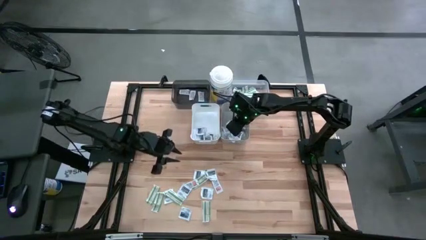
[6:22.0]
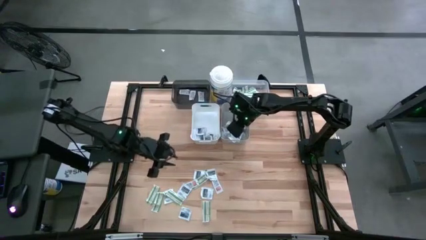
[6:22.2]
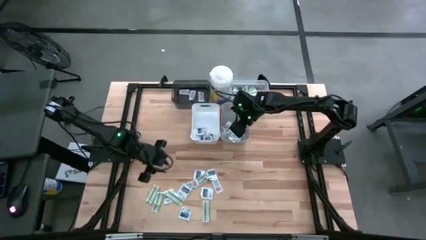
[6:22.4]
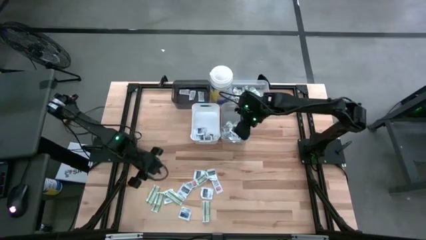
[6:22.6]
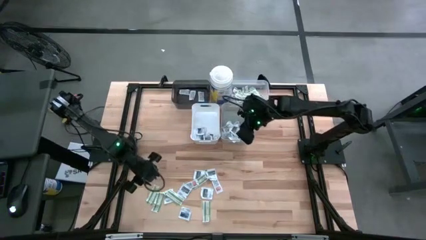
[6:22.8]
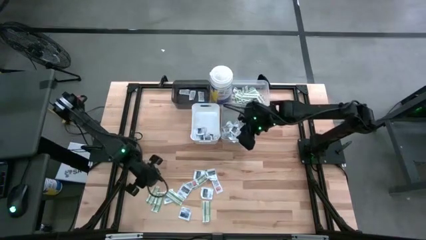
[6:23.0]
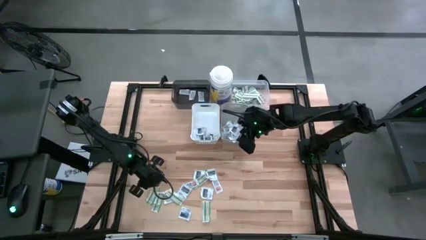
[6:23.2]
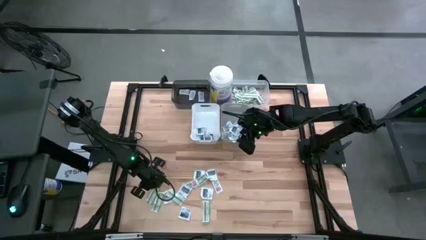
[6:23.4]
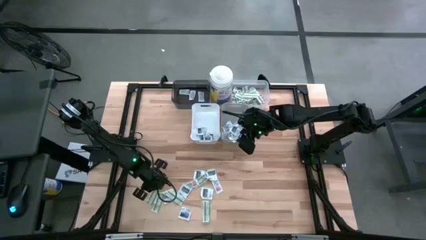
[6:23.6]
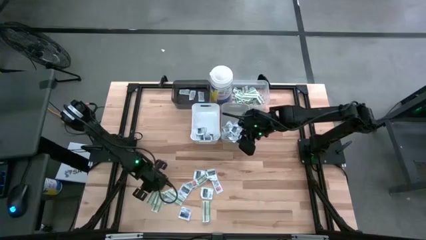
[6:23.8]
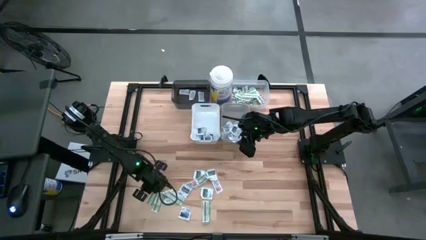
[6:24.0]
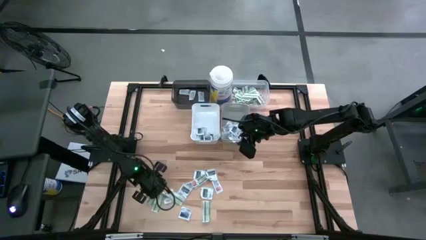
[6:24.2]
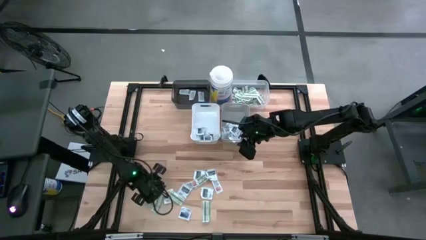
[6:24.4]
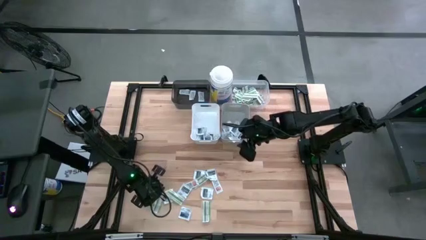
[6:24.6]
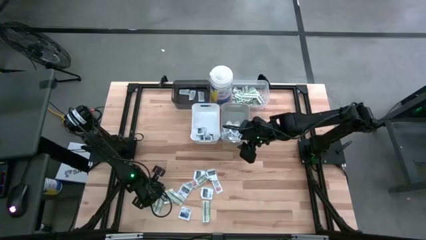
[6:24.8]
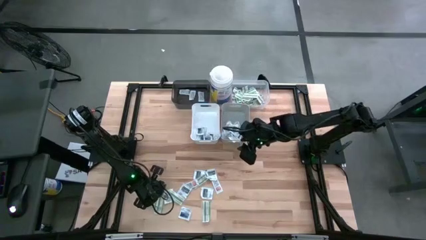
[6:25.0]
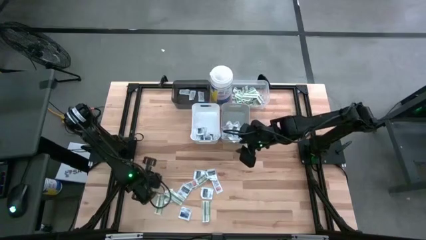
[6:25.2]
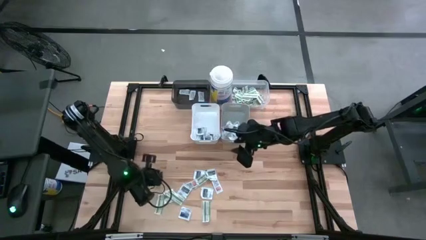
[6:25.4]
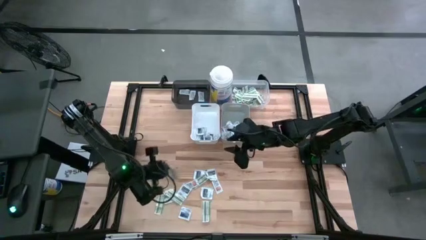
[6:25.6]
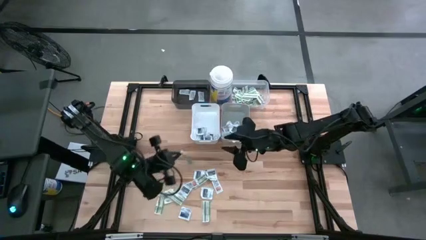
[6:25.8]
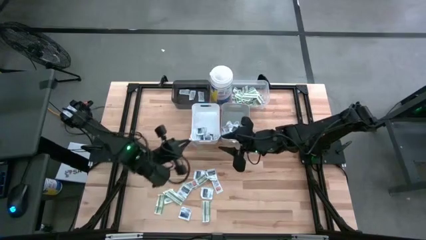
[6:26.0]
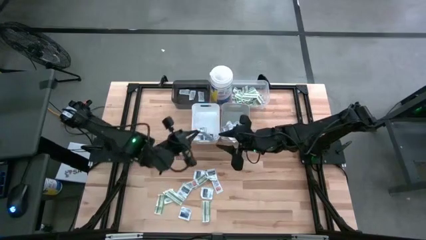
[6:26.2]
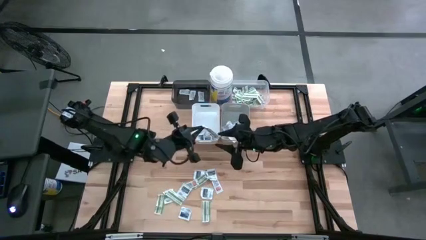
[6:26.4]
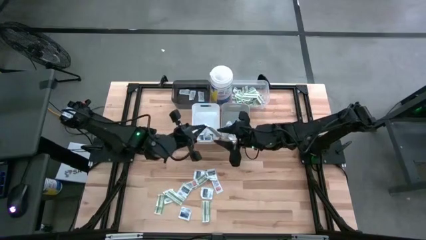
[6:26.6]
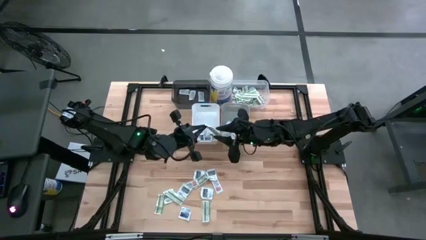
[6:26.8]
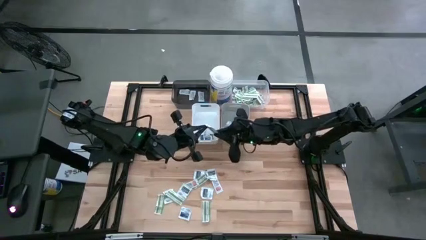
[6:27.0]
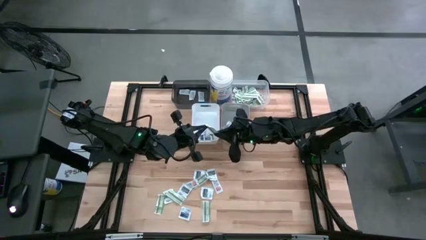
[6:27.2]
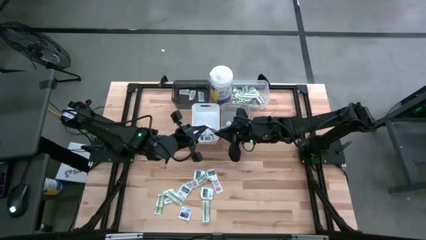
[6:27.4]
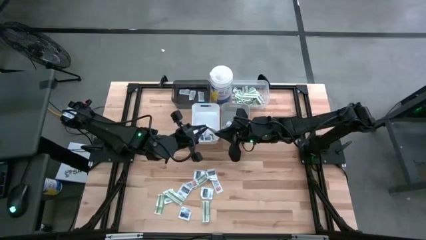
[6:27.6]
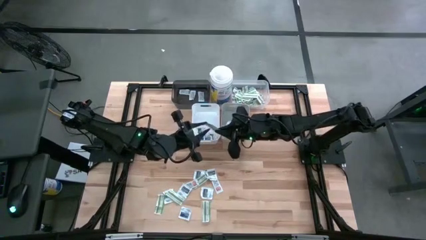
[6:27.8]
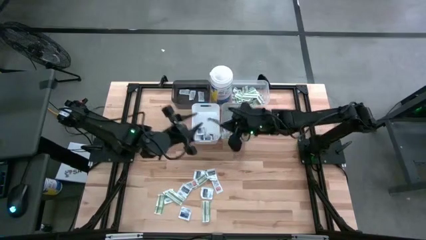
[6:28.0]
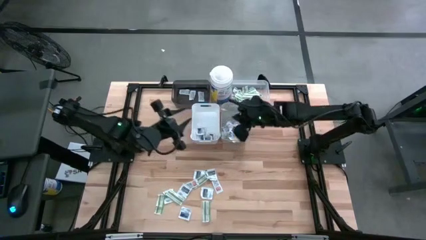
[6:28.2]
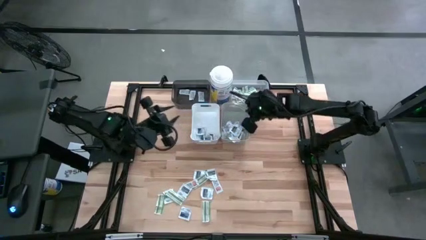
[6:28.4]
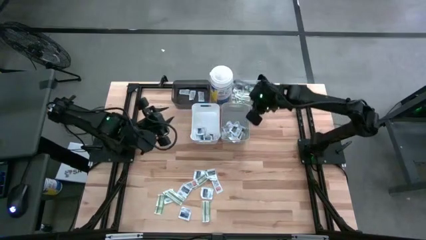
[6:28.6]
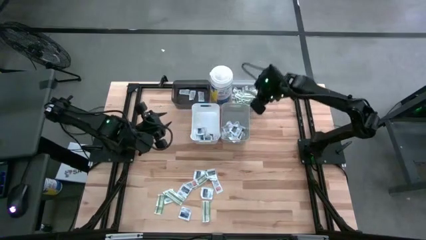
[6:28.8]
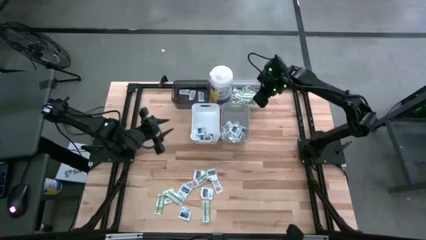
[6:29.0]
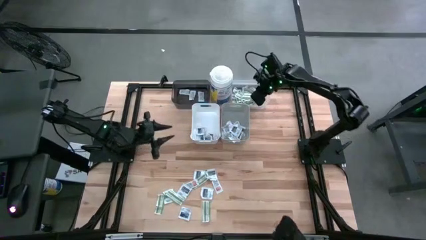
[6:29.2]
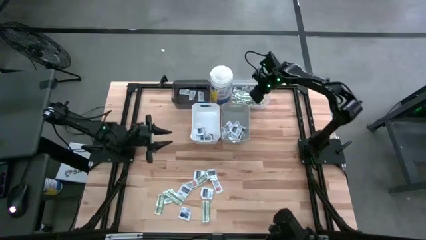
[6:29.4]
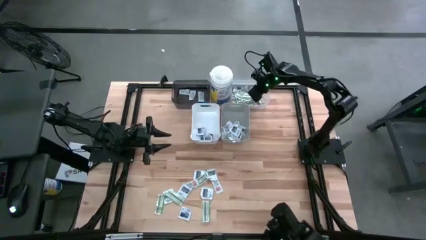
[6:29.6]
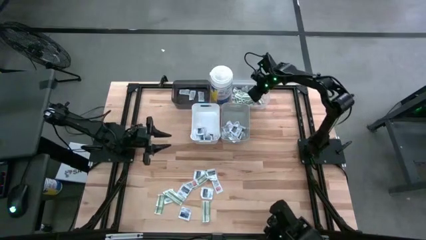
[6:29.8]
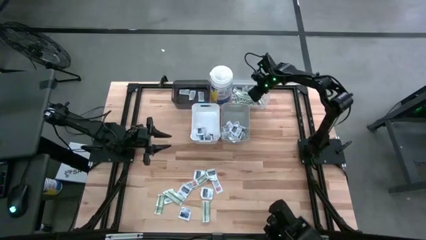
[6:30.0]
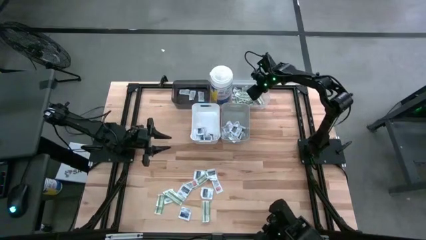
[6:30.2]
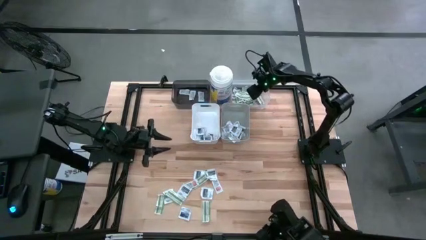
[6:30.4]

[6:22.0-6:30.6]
Task: Pick & Place First Aid Supplies
Put the band aid into the transparent bin

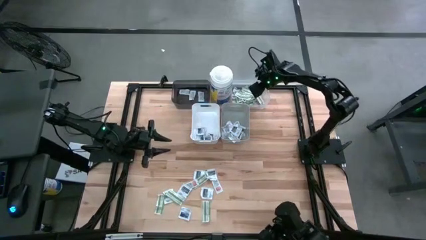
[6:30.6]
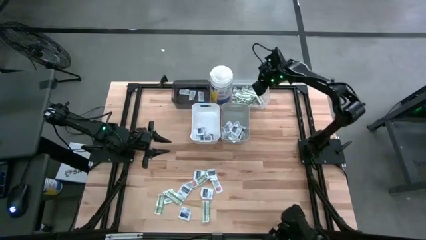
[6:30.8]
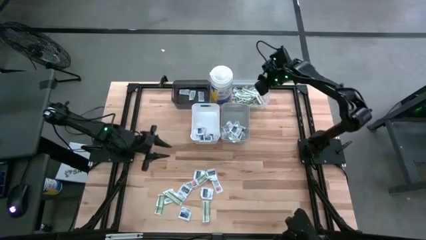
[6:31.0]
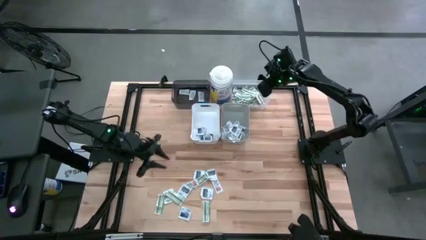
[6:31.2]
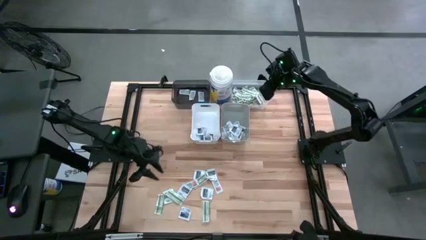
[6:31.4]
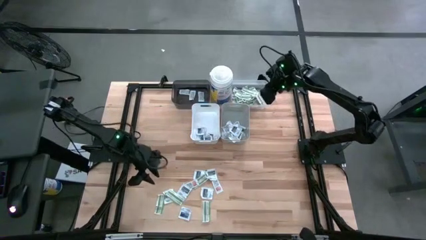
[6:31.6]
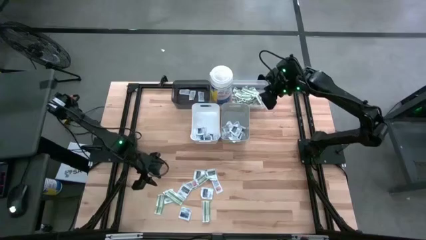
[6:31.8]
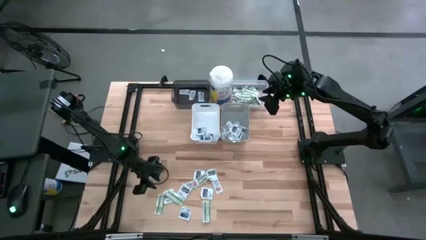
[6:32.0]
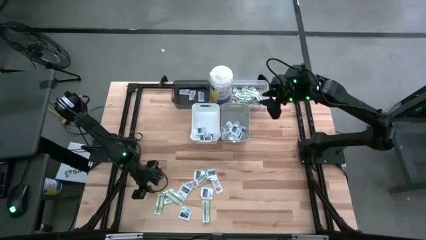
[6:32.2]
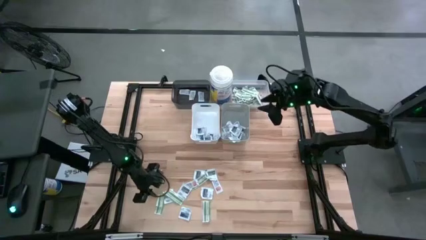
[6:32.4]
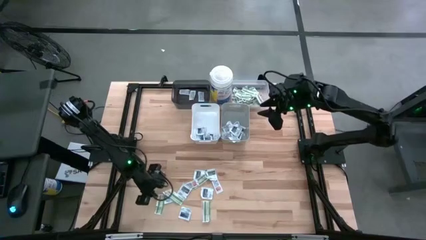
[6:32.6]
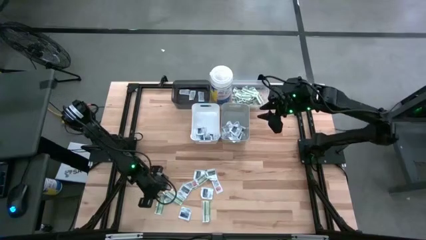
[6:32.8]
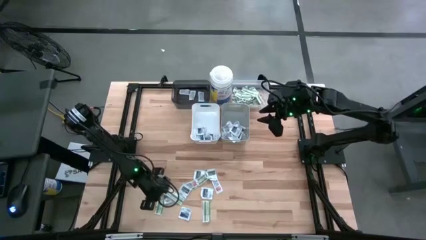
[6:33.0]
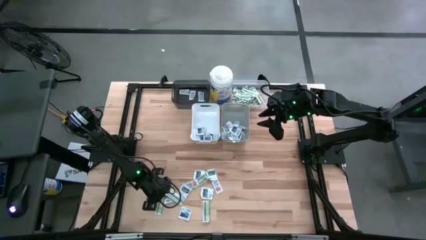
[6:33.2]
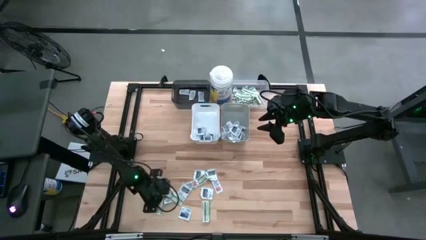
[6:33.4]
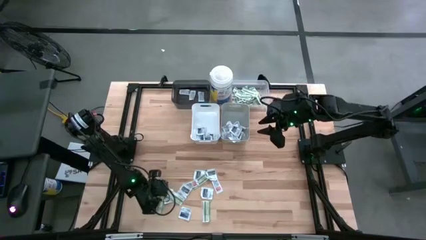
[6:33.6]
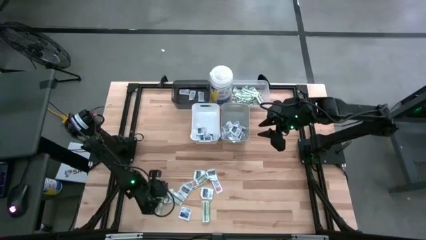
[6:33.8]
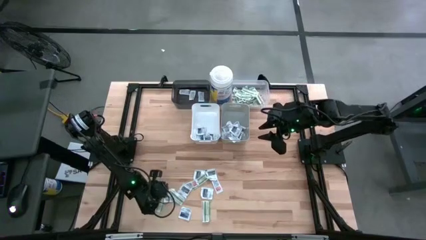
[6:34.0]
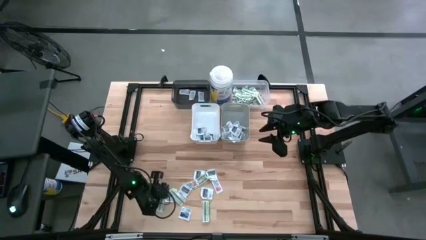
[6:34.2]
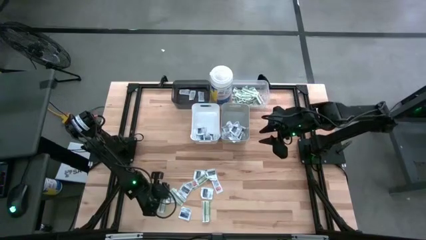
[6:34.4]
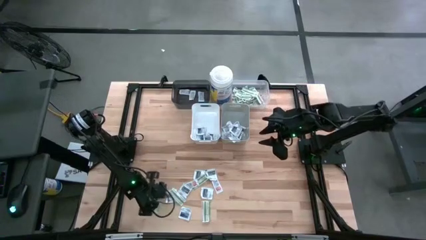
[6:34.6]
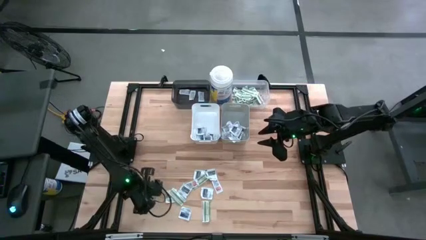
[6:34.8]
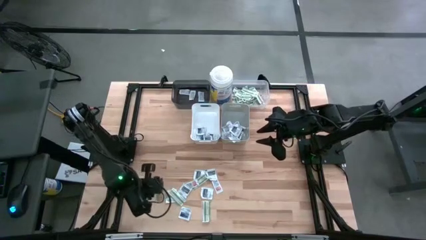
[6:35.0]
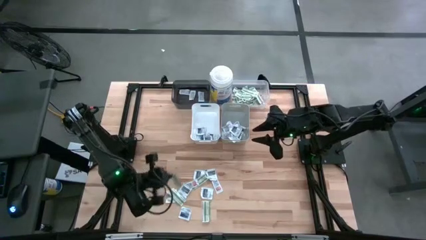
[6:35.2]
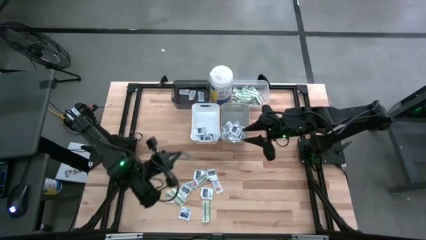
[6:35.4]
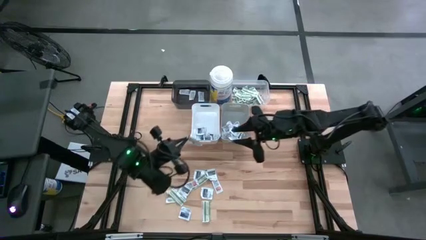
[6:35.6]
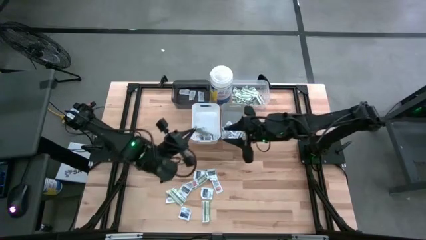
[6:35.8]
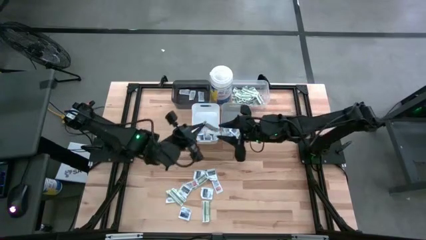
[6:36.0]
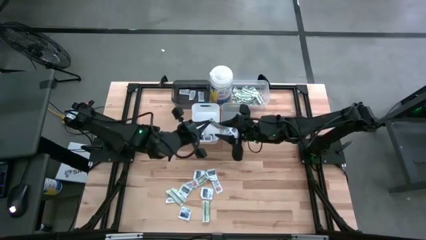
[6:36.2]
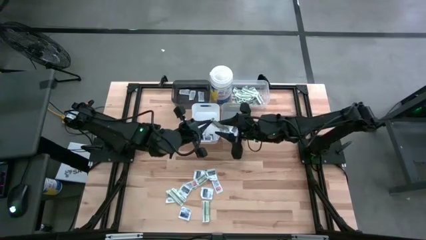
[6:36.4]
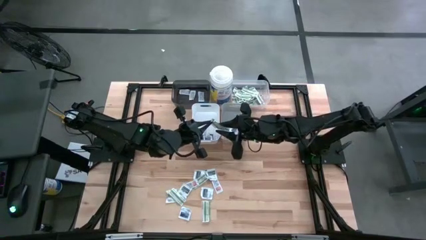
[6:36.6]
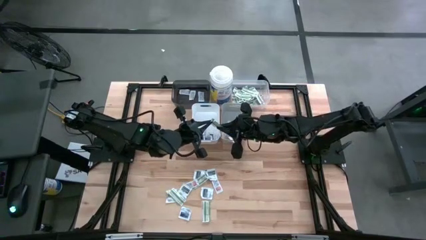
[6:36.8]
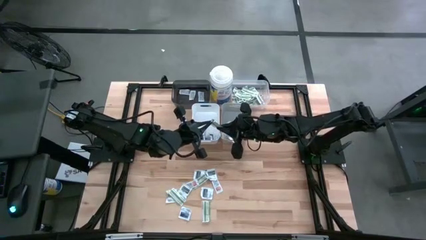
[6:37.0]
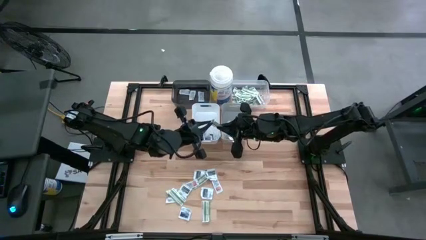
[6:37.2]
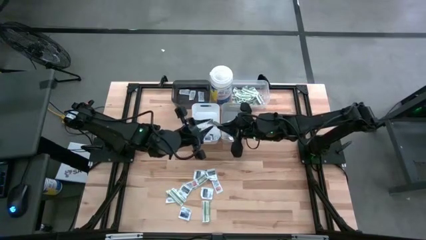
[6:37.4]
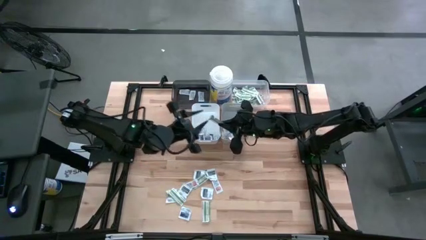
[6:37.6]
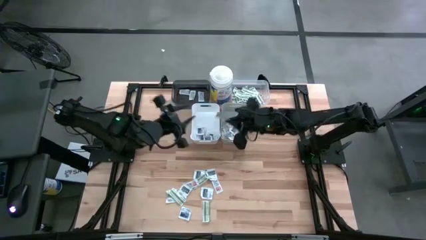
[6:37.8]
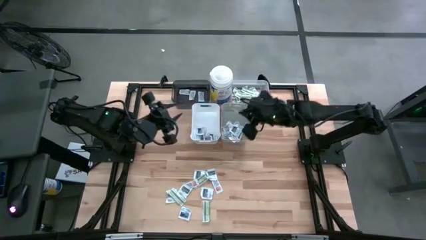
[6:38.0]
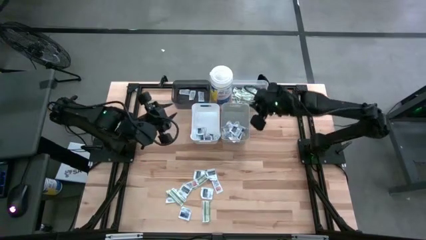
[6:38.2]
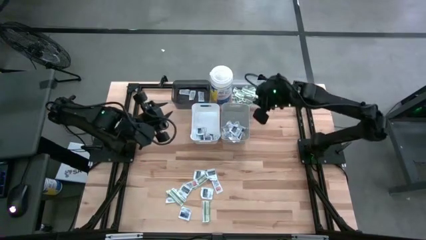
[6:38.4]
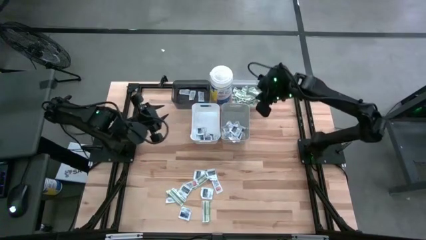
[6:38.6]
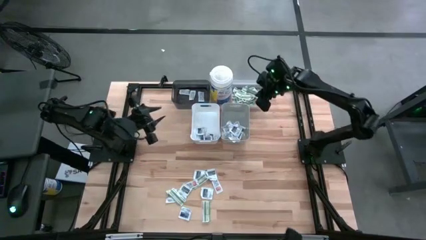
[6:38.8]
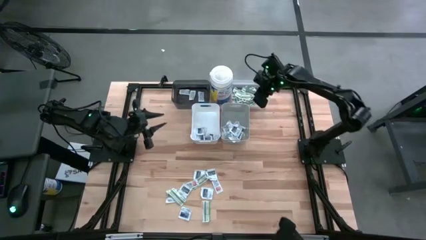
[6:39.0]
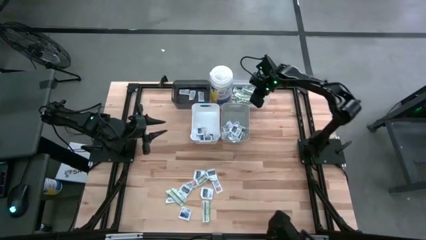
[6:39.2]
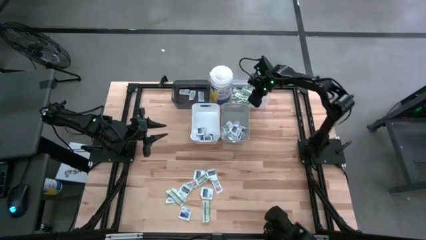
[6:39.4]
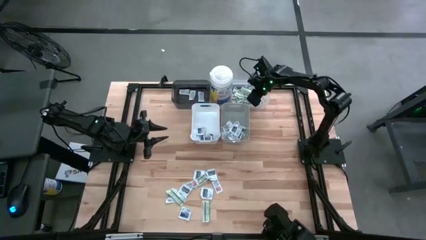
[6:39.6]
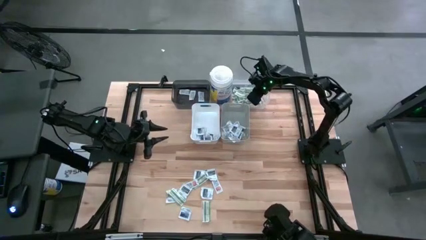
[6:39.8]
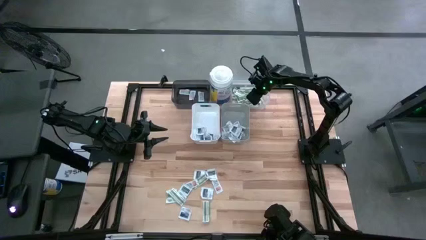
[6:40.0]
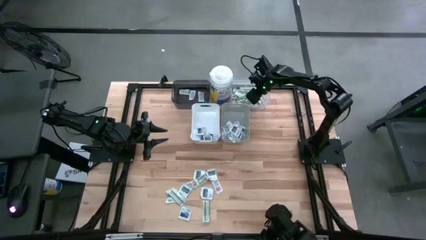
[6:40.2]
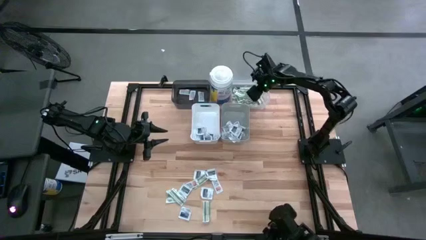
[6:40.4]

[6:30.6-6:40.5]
Put the band aid into the transparent bin
